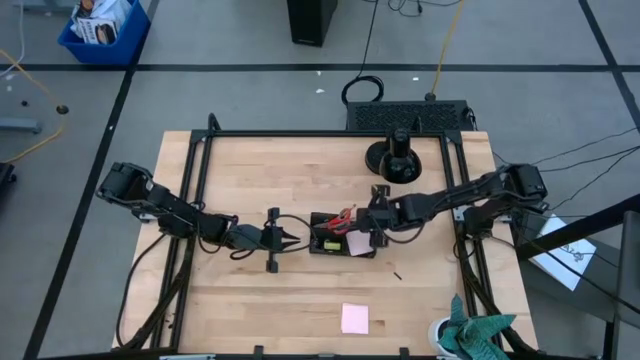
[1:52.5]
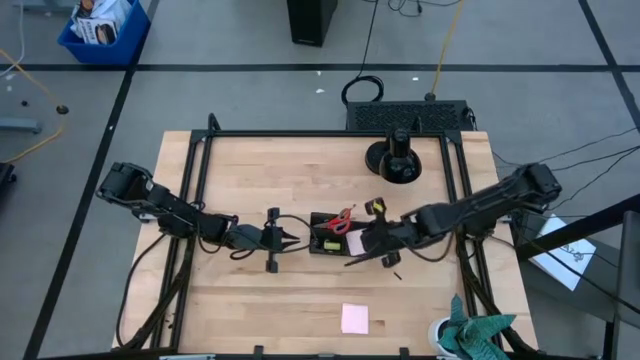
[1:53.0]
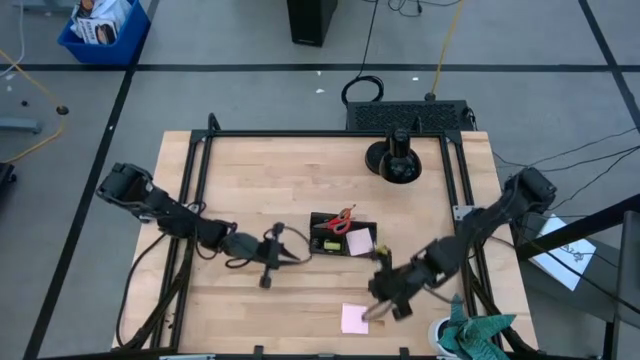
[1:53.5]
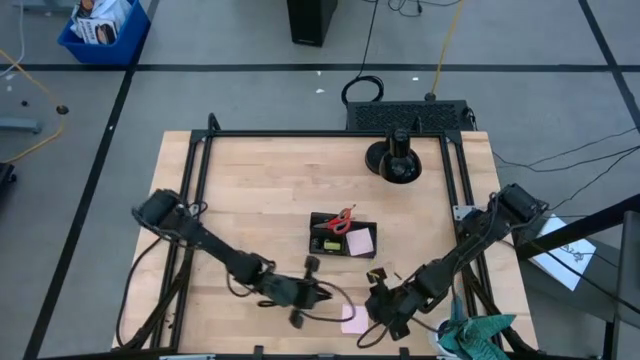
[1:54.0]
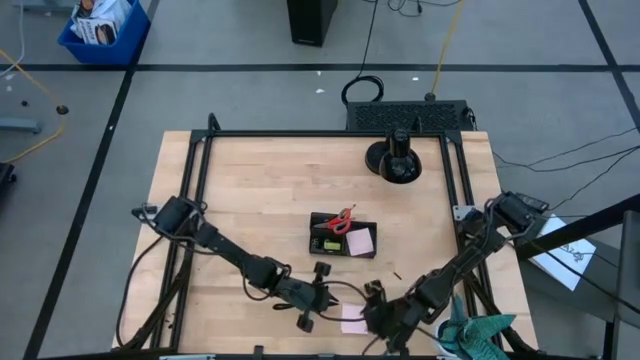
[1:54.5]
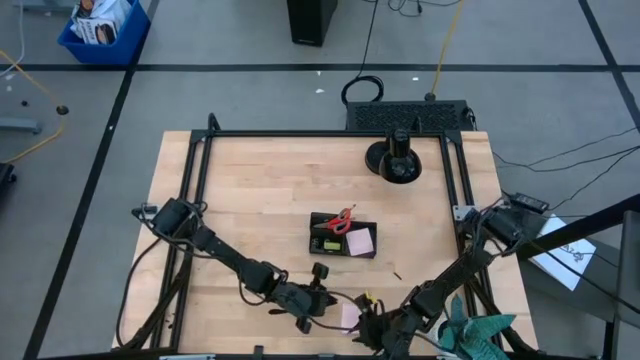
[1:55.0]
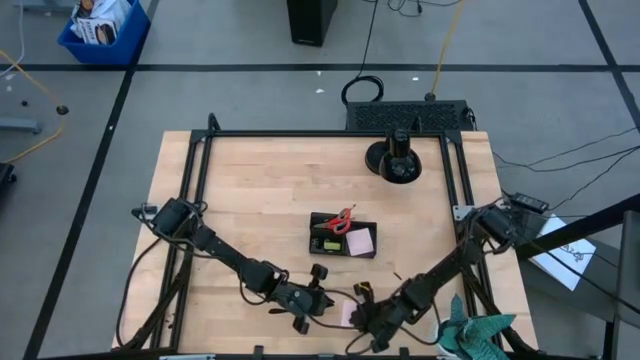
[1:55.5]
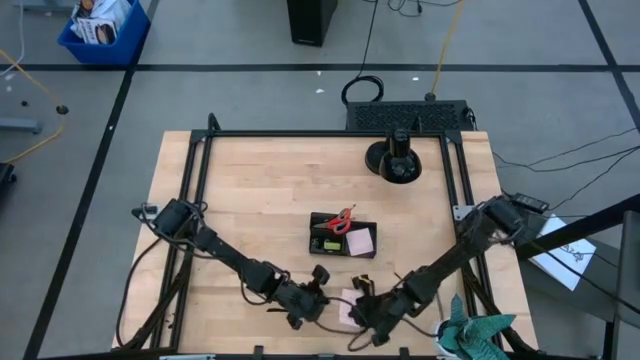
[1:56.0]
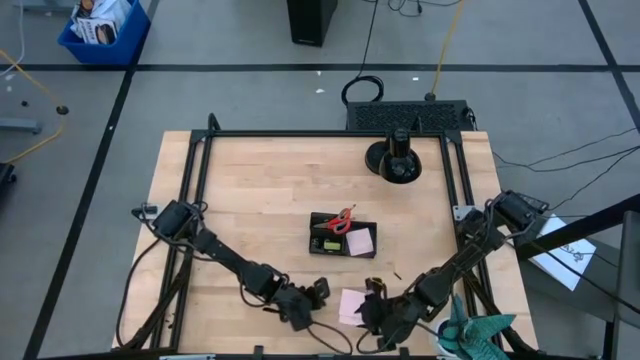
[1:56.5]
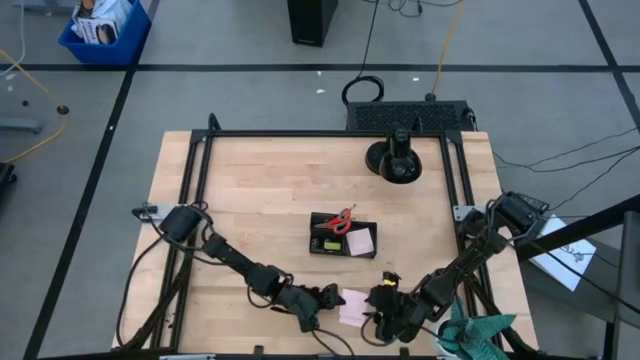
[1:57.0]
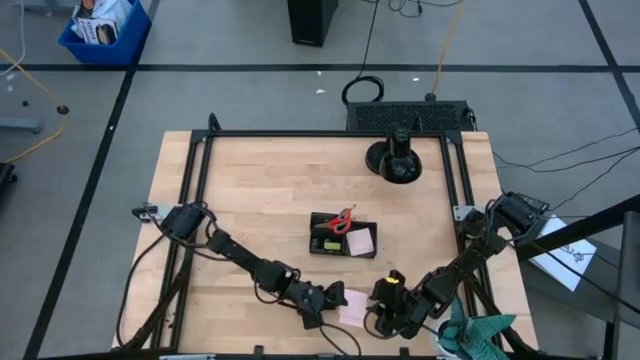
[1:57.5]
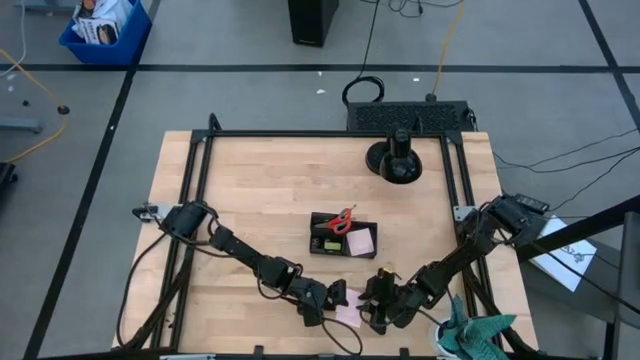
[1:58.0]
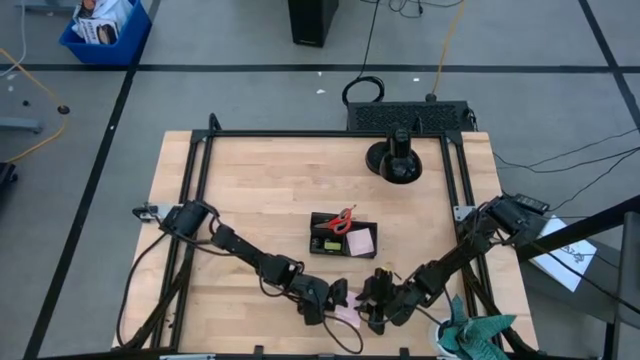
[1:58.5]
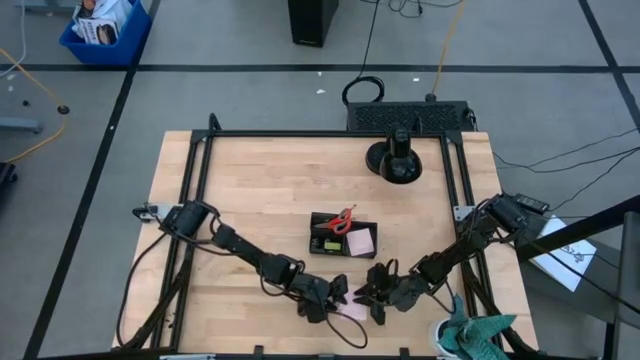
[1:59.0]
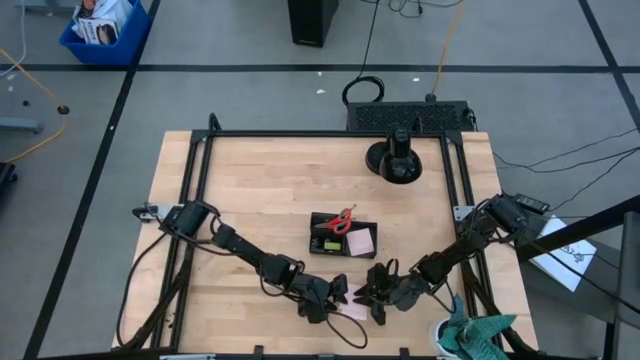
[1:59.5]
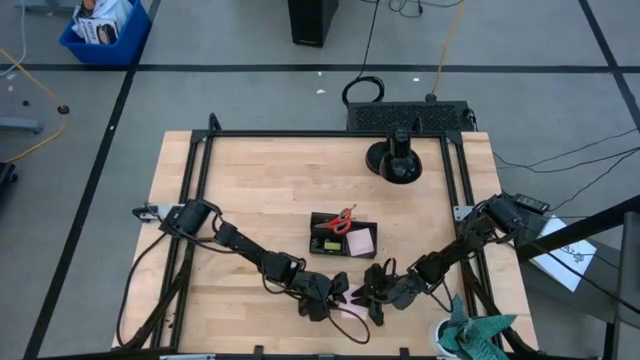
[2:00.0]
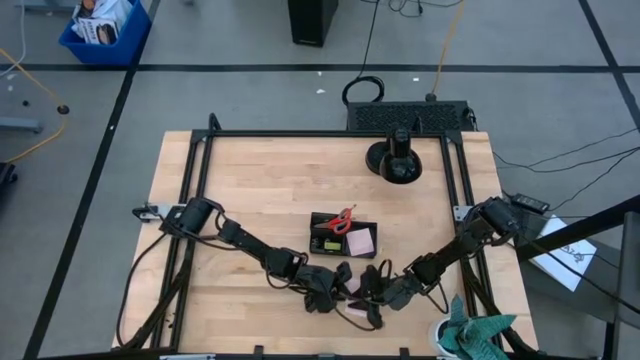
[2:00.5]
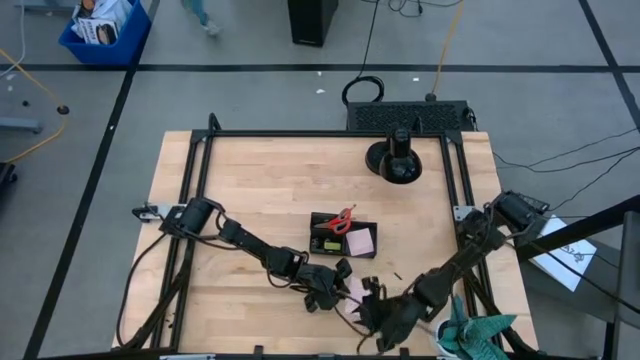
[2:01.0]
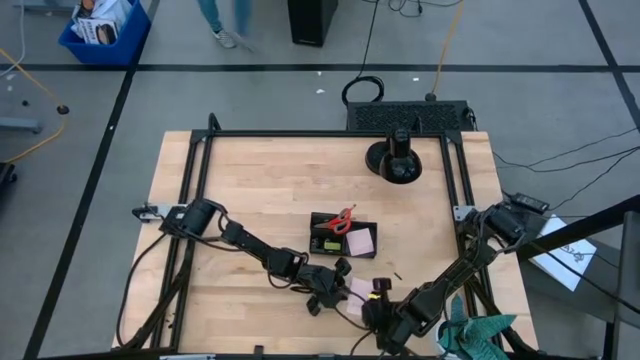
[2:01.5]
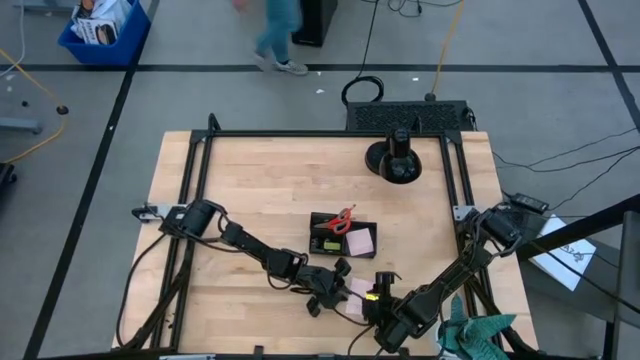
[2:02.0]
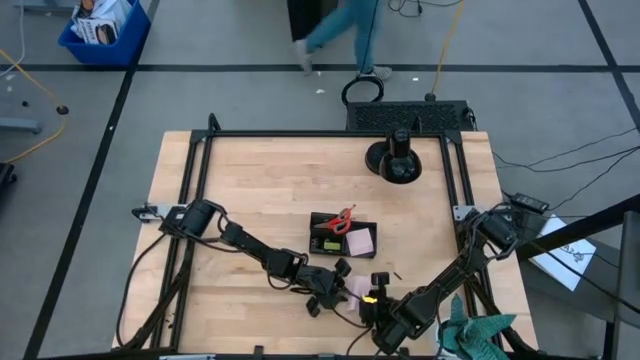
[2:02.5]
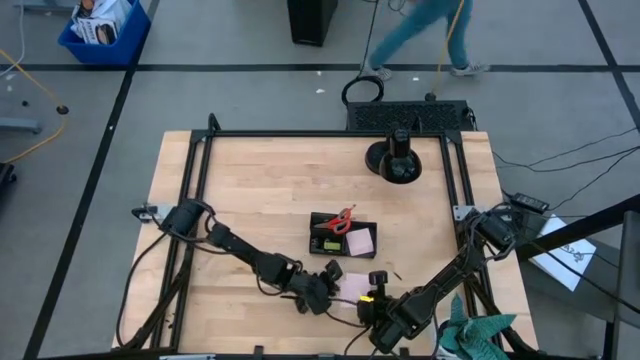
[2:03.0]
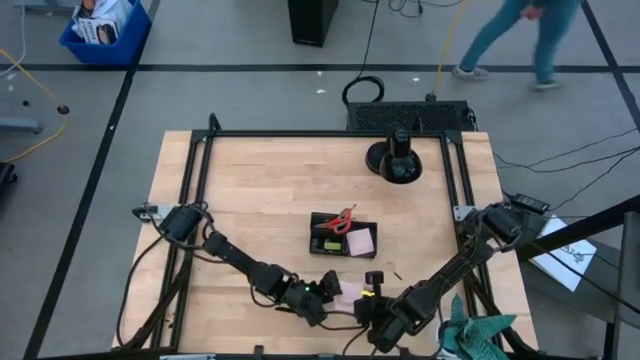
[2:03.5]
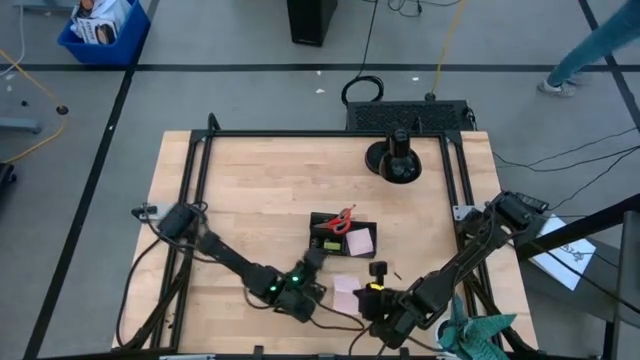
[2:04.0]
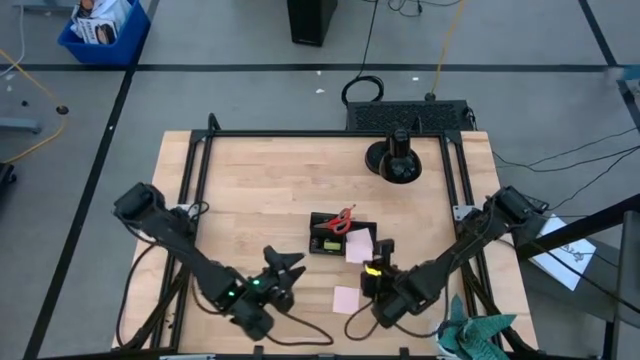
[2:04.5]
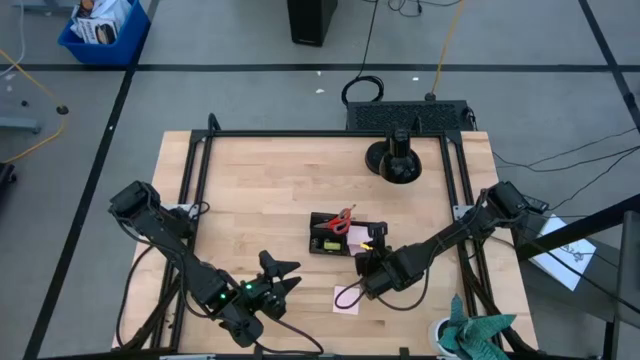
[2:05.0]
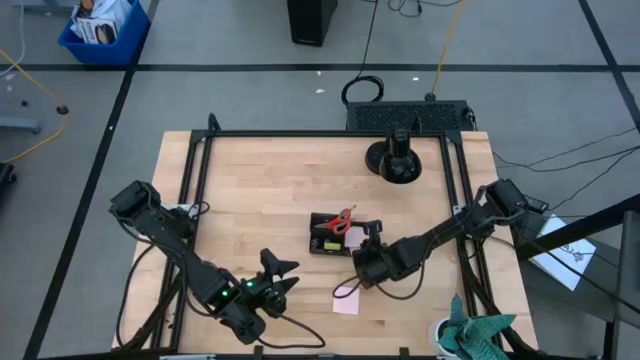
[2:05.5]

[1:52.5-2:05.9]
Task: Pick and place office supplies into organizer
Put the pink sticky notes into the black desk organizer

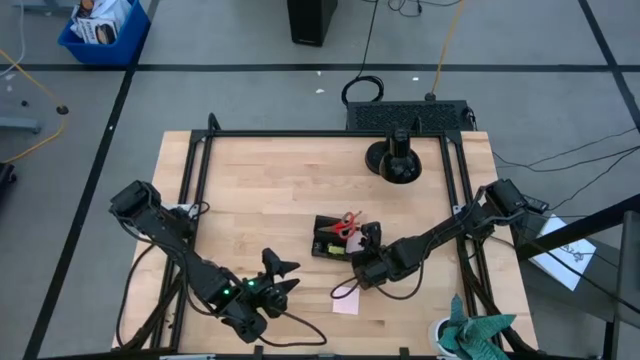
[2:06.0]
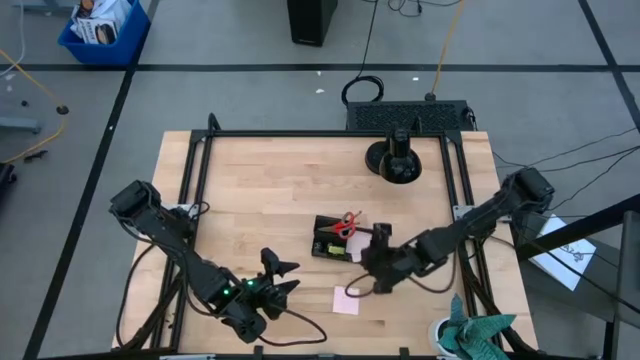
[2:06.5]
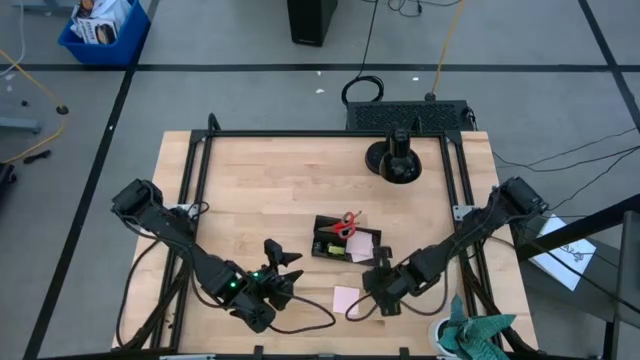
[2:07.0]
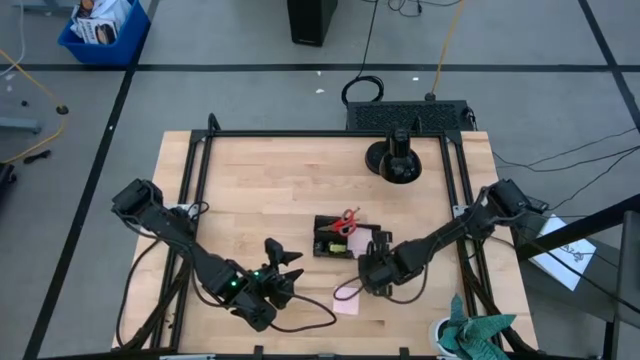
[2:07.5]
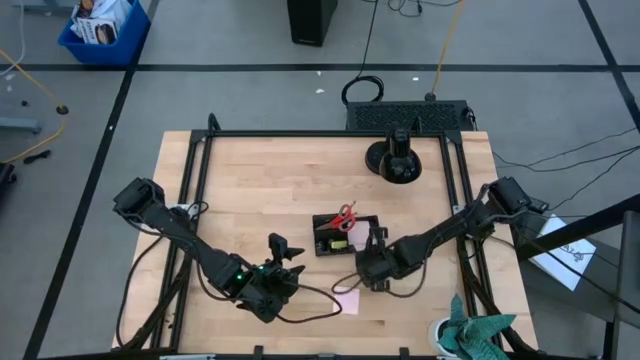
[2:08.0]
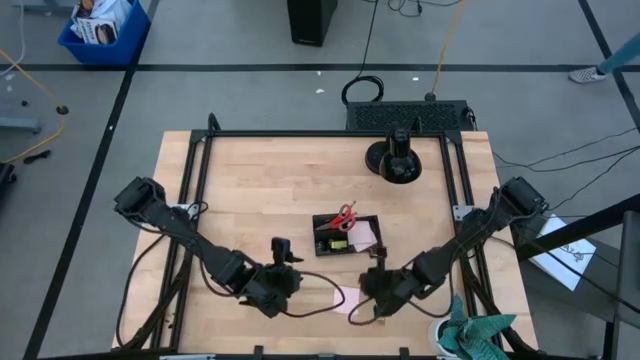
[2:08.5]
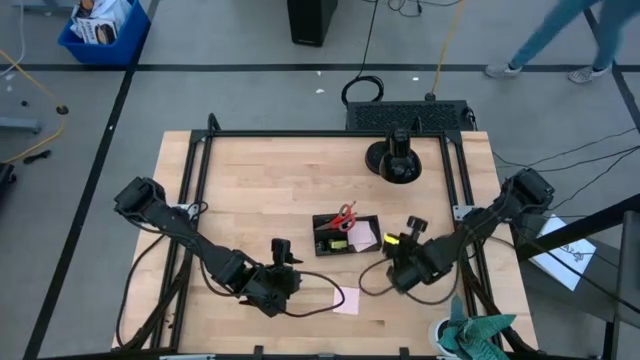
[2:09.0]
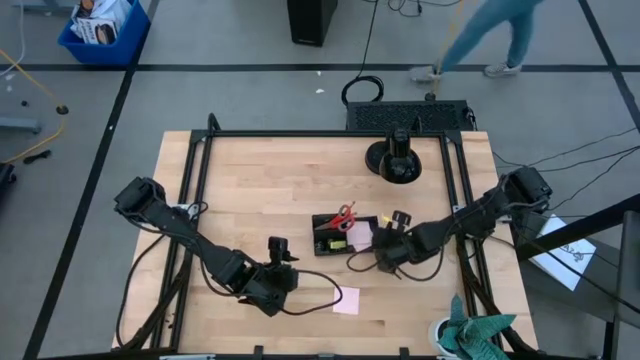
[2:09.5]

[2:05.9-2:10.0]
Adjust the black desk organizer

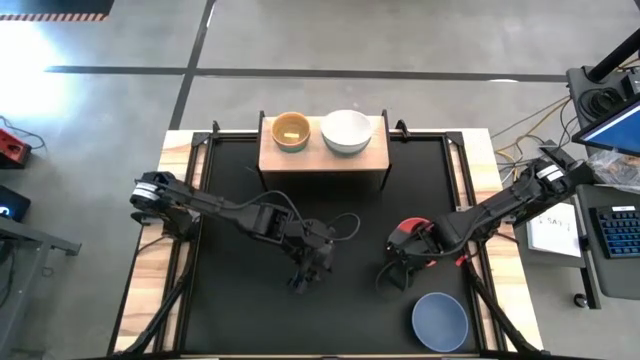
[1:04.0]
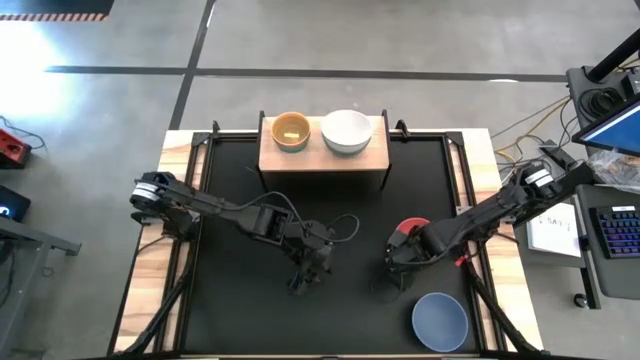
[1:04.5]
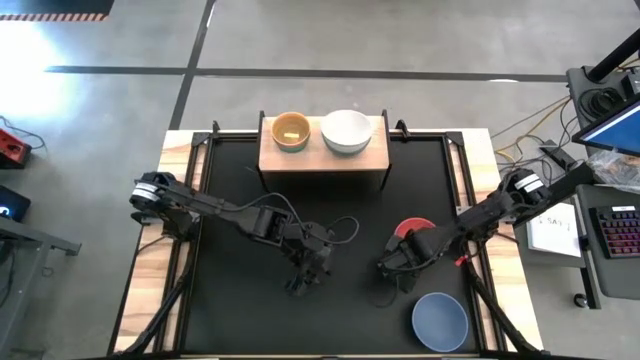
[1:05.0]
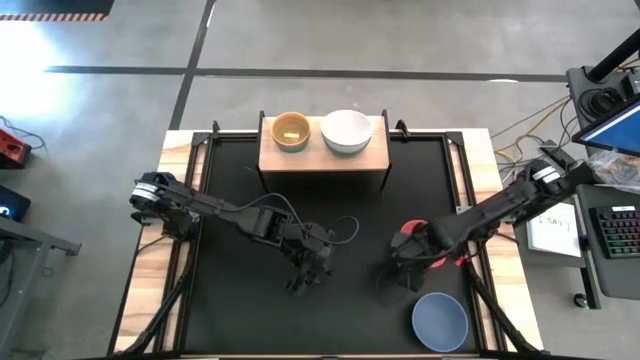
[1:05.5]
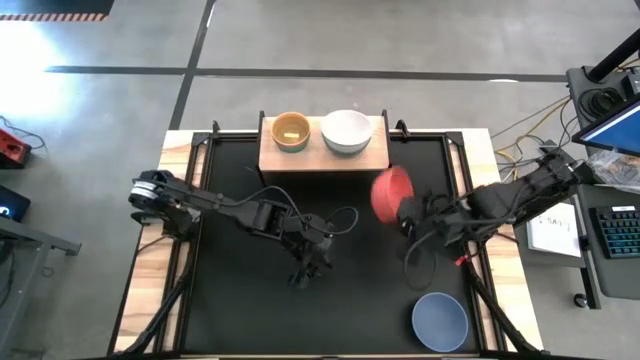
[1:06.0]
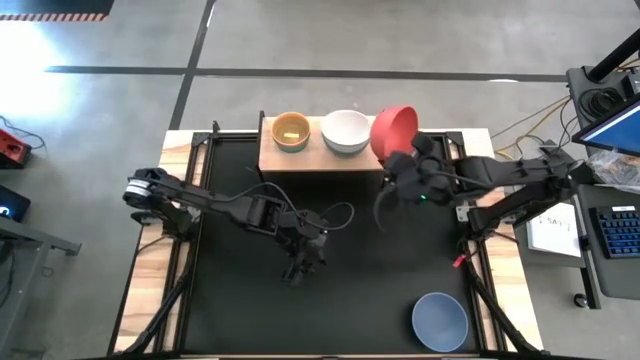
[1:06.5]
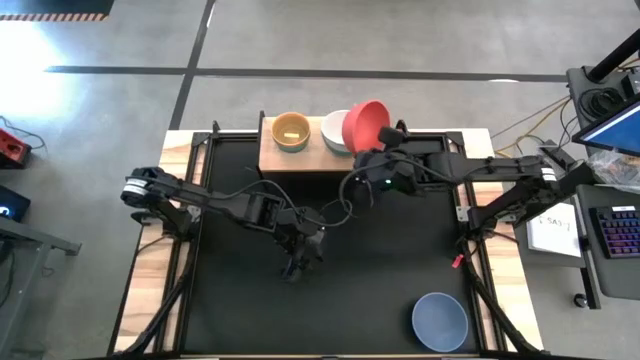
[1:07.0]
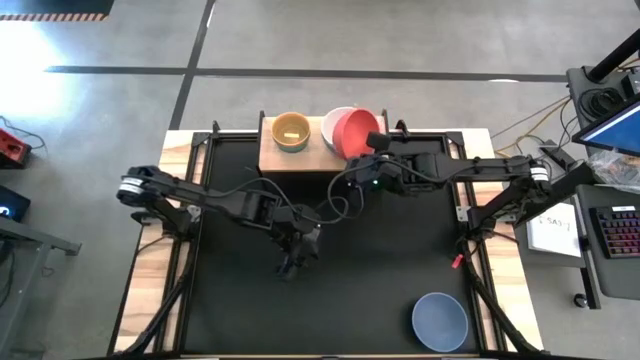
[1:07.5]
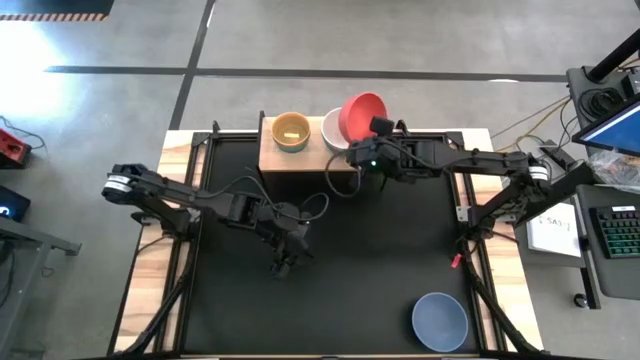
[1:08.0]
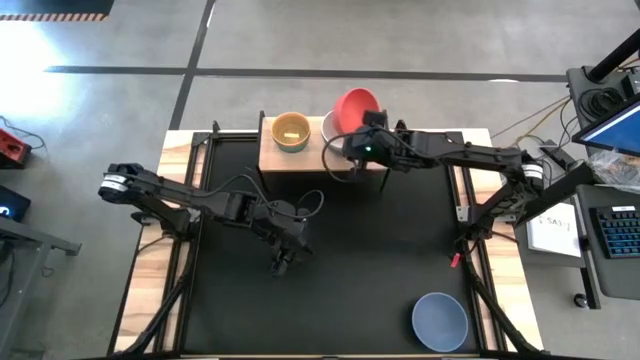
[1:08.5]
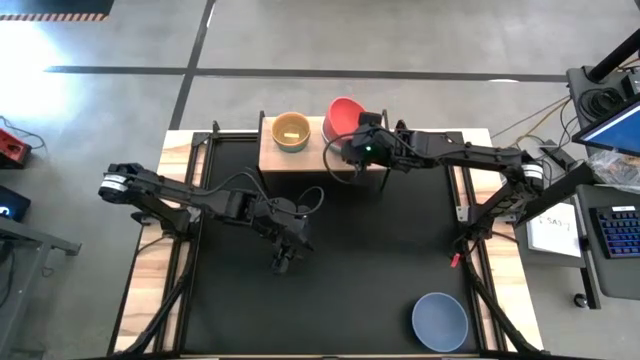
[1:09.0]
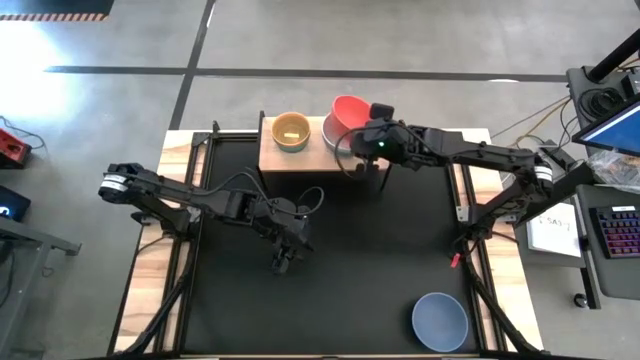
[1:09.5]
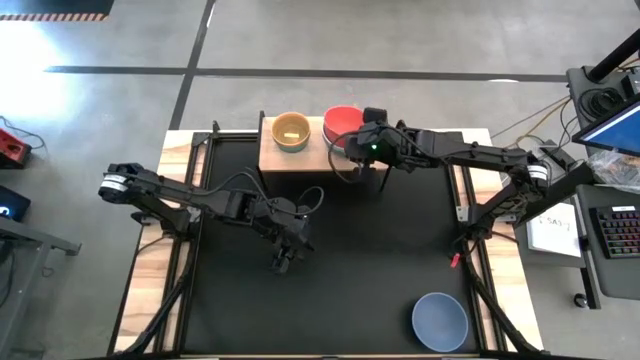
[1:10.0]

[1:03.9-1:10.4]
Task: Place and stack bowls onto a shelf
Stack the large orange bowl on top of the large white bowl on the shelf
